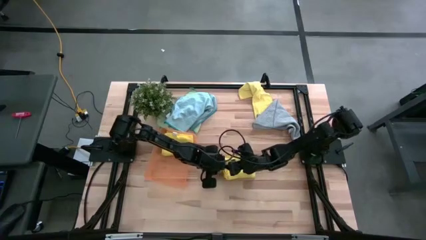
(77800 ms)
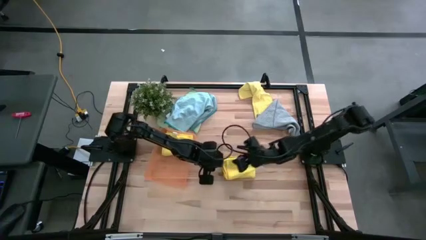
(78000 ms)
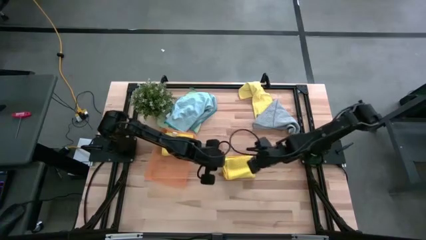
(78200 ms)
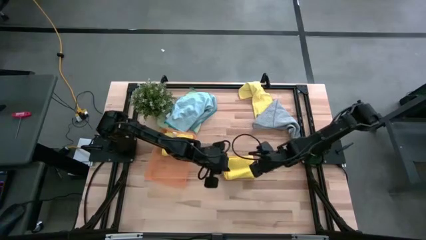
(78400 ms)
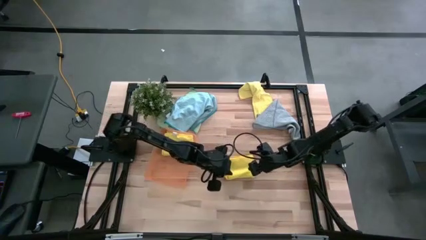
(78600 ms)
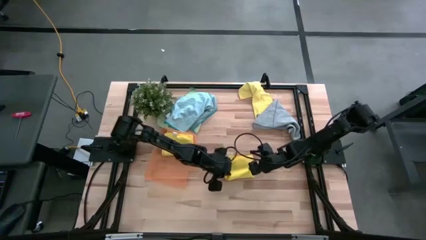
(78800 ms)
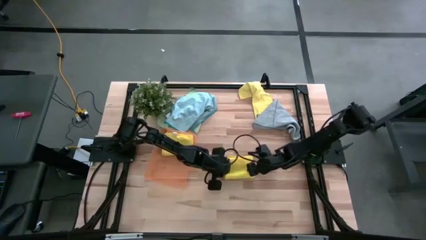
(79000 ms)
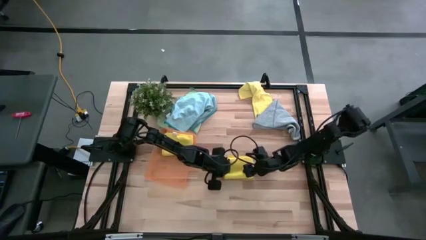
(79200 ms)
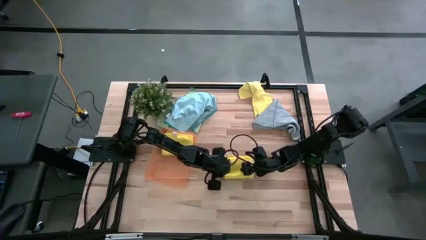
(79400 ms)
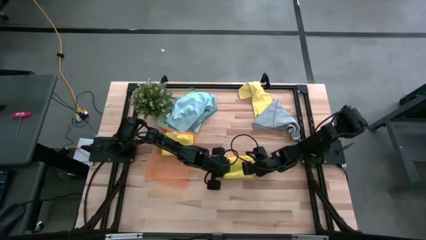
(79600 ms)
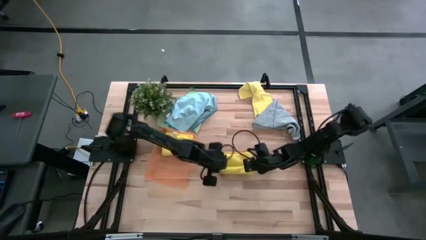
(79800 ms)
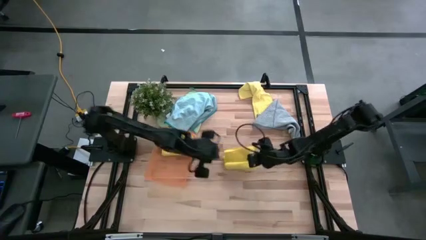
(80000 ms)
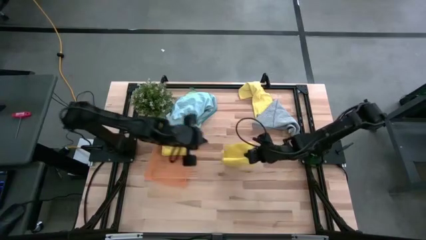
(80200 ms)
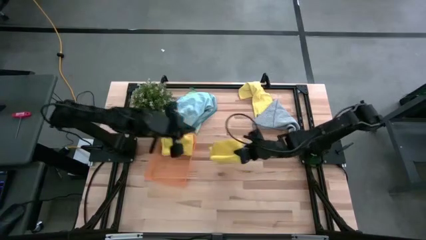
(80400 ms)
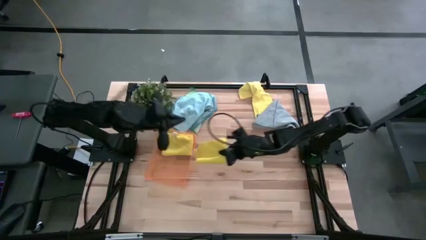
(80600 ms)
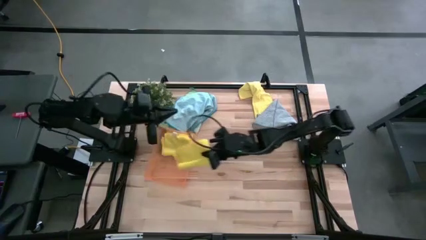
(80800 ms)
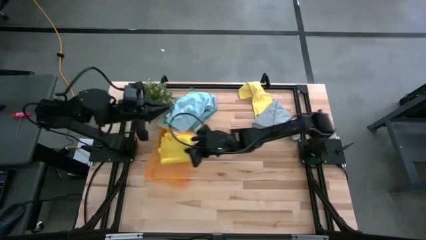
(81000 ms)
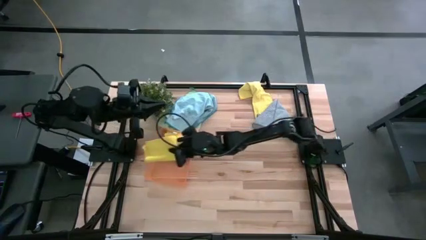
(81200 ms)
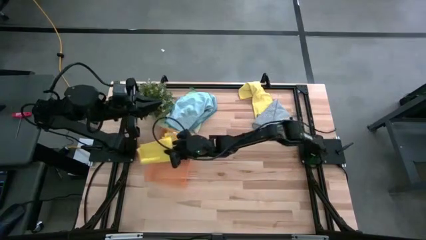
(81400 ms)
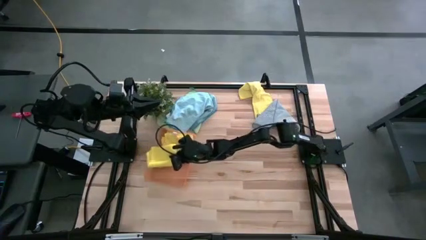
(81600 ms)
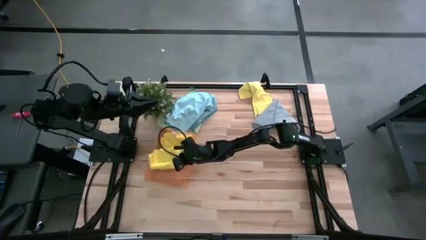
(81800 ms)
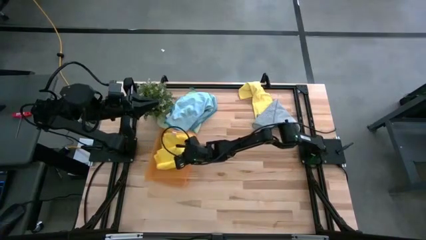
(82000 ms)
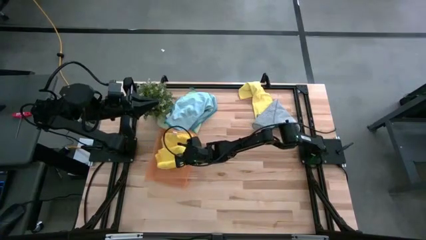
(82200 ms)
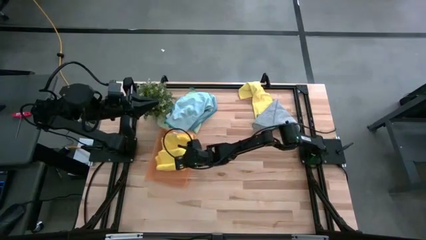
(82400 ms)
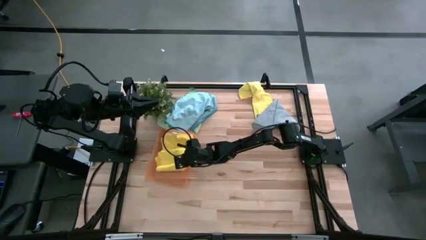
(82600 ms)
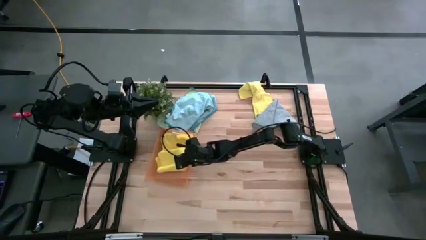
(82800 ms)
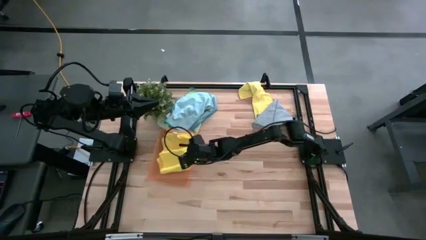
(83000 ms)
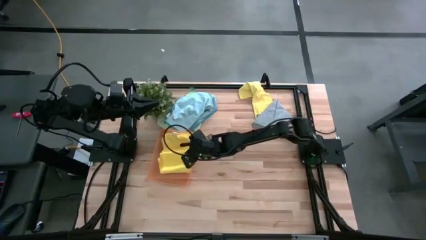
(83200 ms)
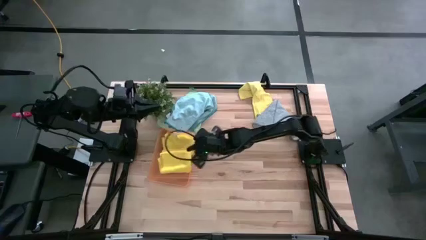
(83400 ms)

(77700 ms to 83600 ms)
Task: Fold microfiber towels
Put the middle right yellow folded microfiber towel into the orange bin

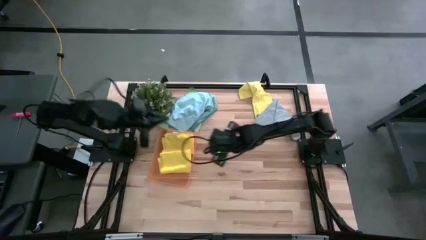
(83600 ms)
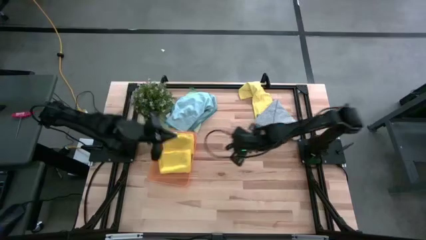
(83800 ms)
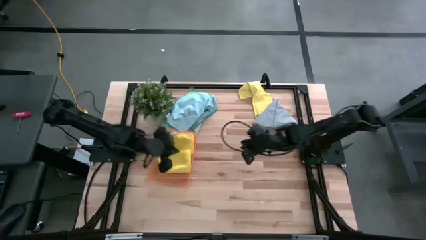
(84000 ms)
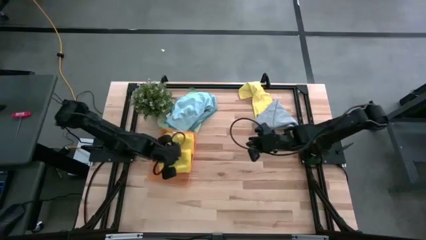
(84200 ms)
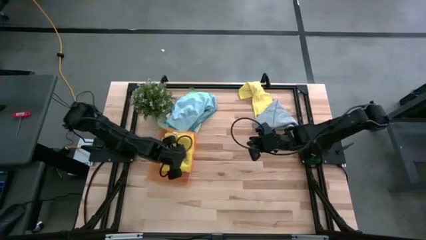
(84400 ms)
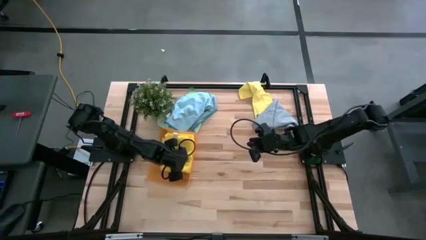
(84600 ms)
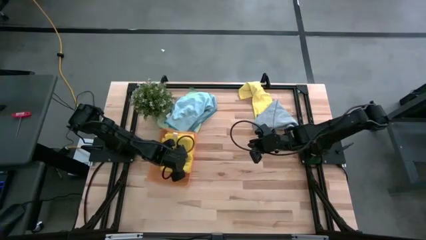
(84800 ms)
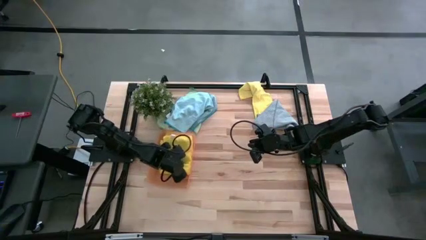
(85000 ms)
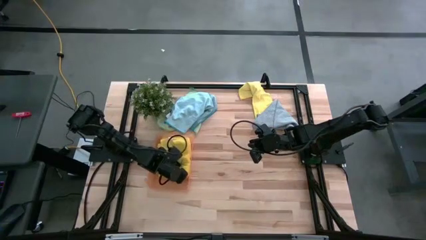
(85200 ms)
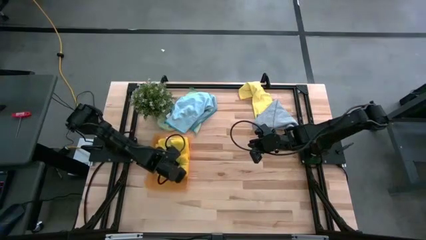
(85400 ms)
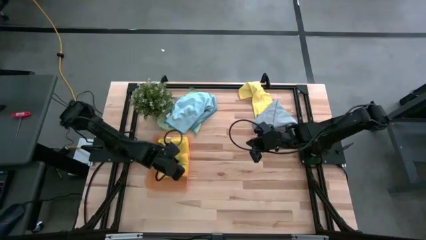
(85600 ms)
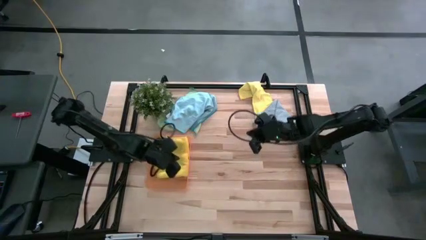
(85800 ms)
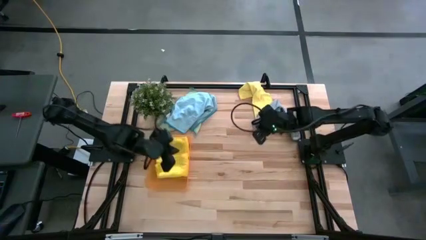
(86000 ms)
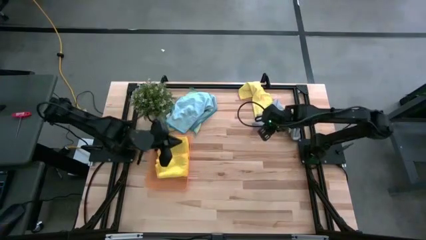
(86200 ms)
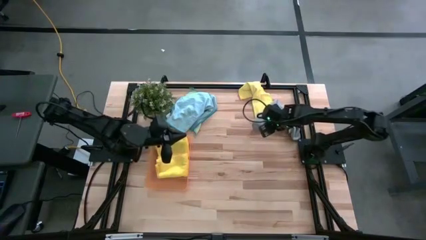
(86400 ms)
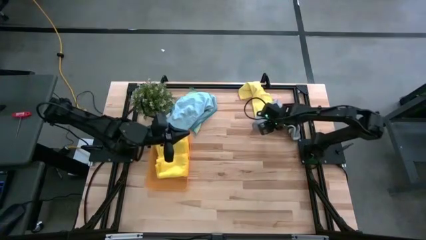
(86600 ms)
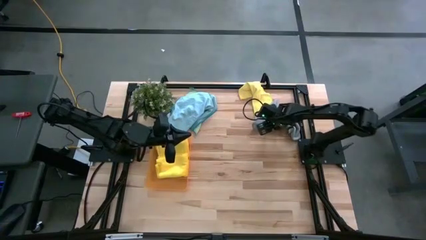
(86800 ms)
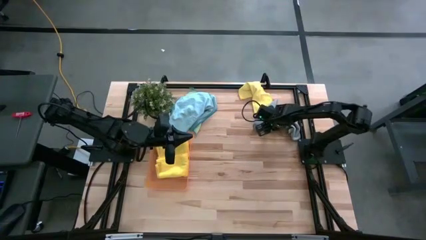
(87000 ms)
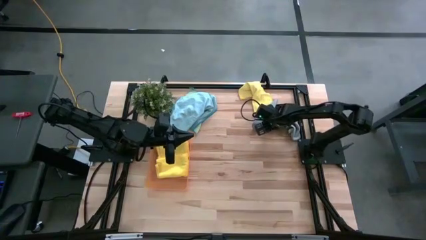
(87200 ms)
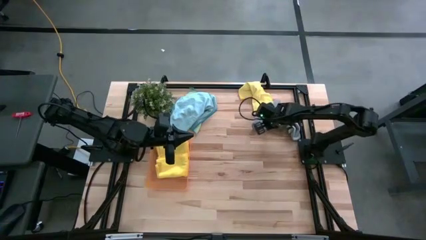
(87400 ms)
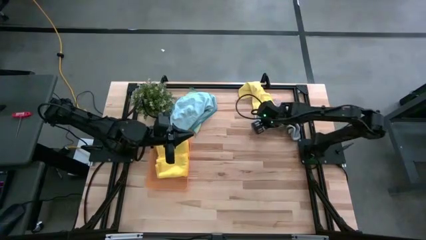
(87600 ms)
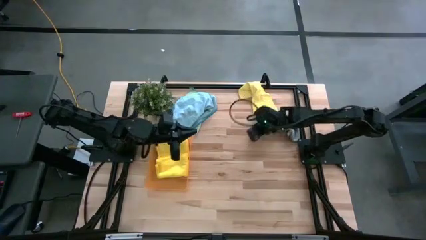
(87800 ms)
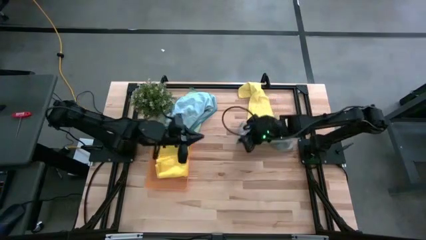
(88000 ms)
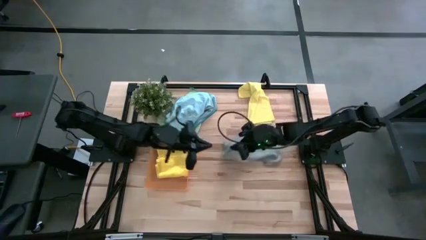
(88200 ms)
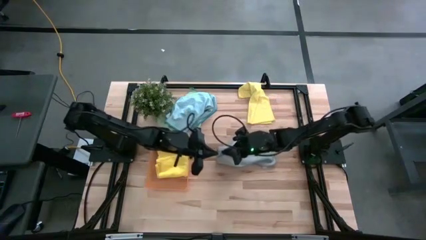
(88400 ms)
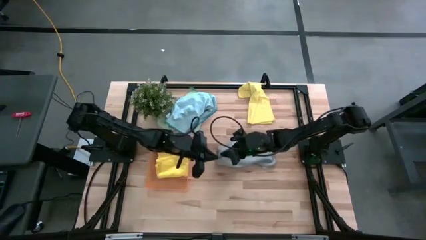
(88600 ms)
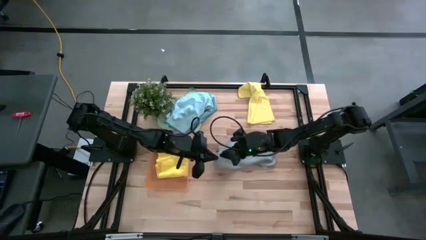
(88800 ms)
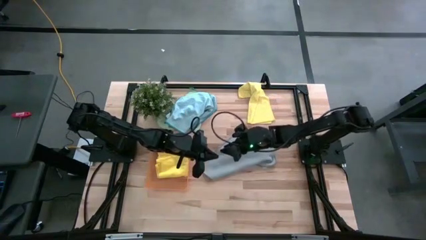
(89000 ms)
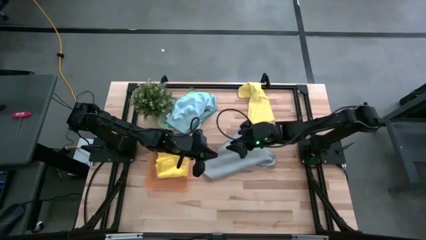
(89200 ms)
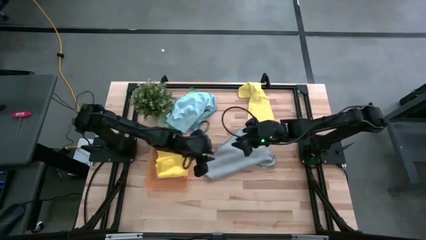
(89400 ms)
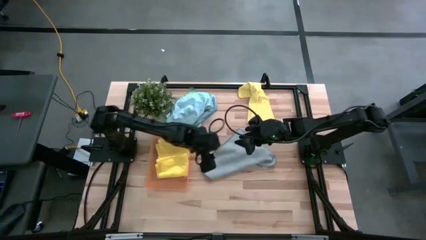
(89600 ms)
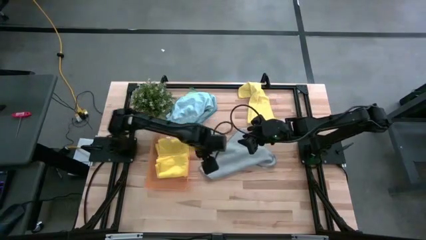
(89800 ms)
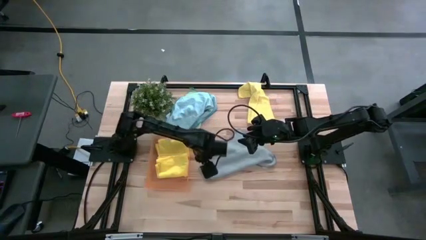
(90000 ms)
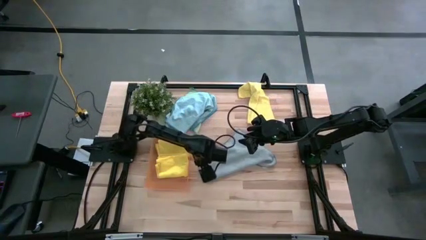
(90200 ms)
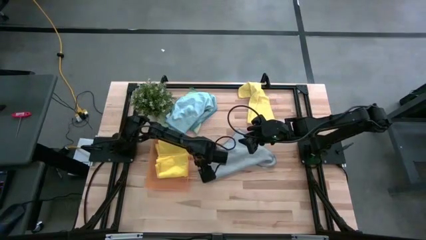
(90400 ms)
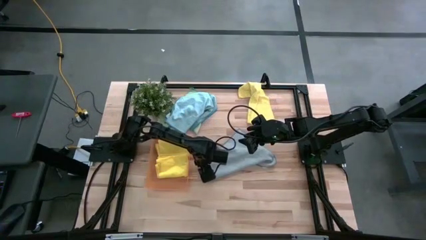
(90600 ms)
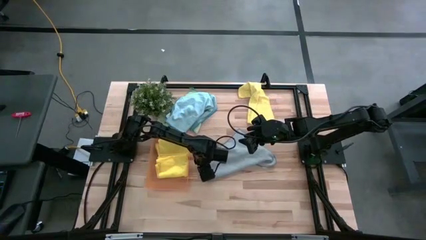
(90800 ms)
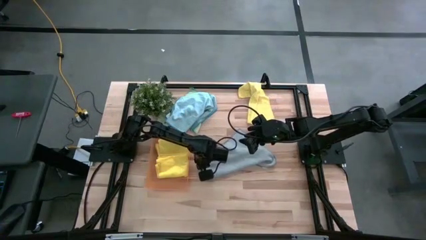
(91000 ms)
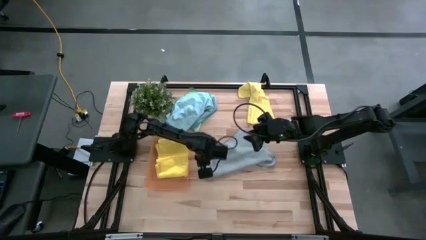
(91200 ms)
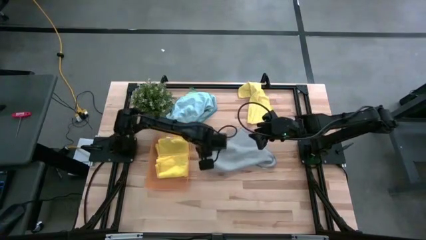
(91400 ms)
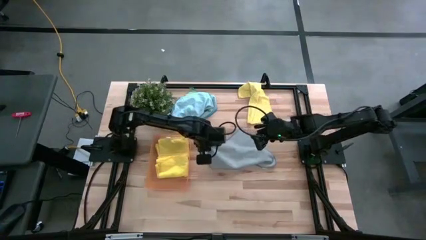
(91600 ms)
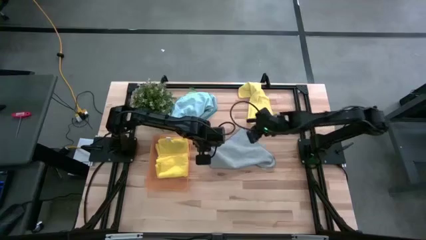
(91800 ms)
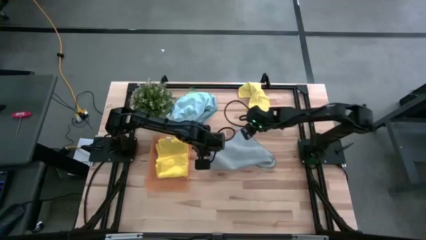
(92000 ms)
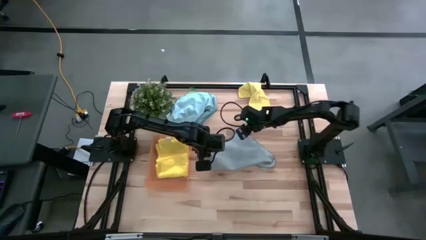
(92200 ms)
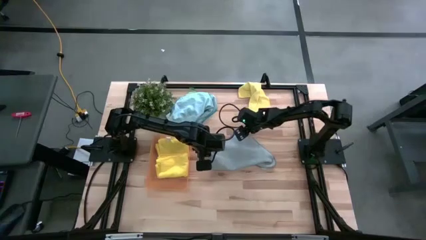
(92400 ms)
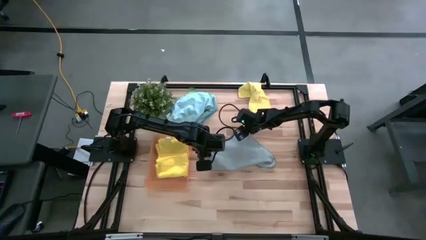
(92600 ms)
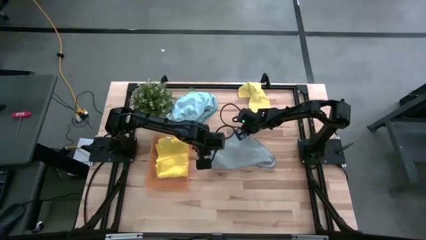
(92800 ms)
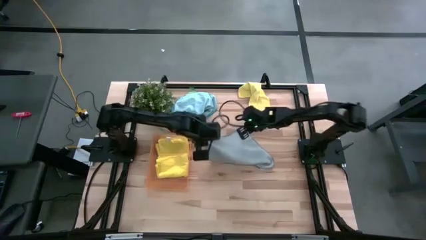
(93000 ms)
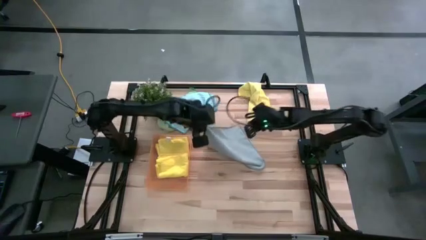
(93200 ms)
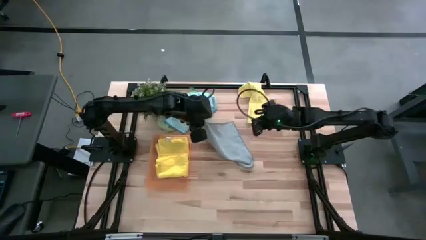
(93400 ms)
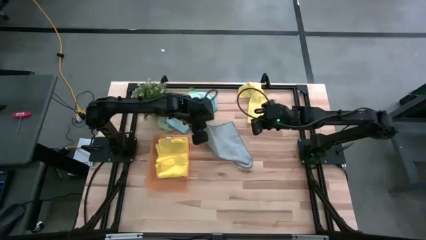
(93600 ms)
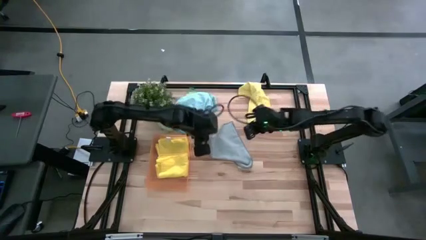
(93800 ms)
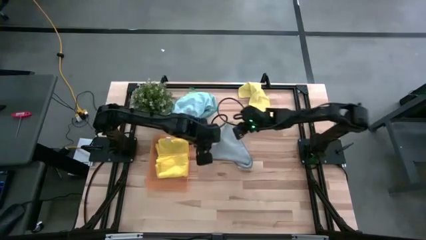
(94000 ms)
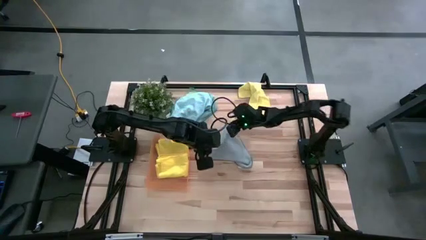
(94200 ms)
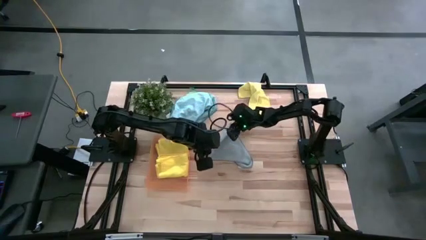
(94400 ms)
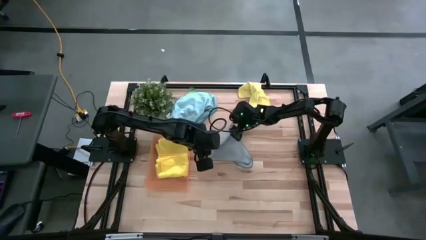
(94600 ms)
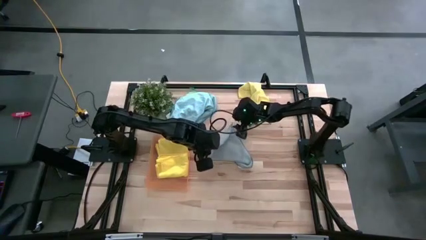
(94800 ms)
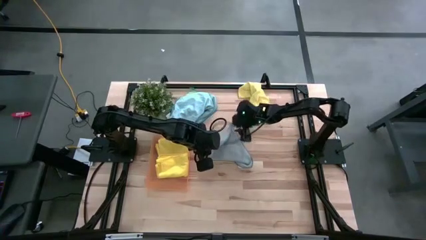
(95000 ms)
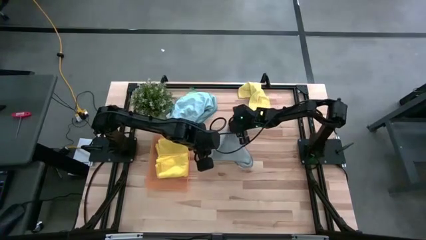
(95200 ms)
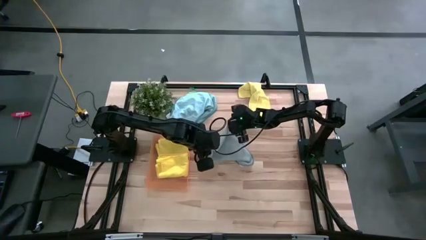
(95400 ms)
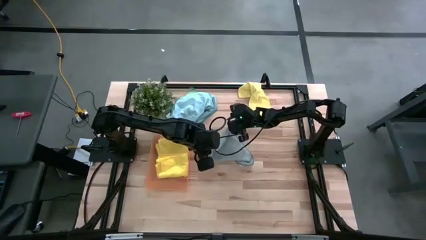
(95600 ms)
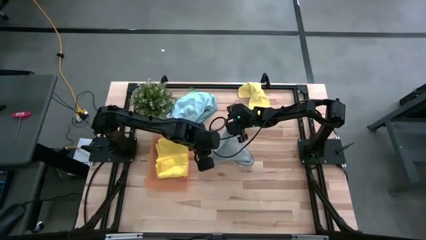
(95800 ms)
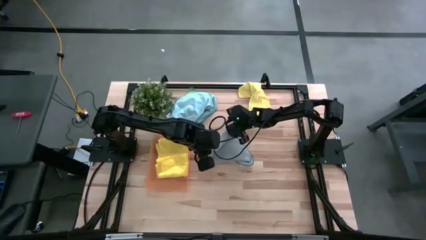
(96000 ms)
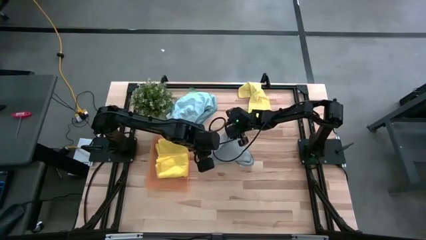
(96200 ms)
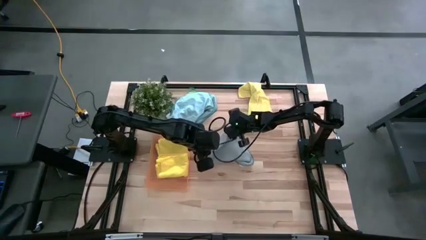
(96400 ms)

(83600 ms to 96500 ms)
Fold the gray microfiber towel
